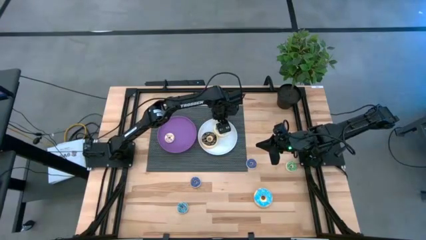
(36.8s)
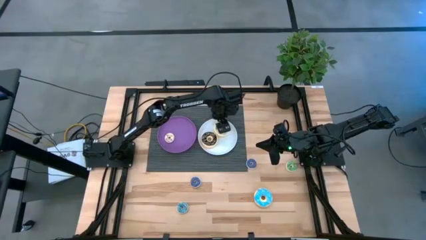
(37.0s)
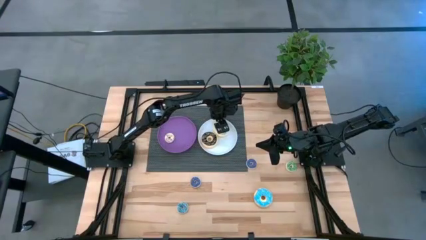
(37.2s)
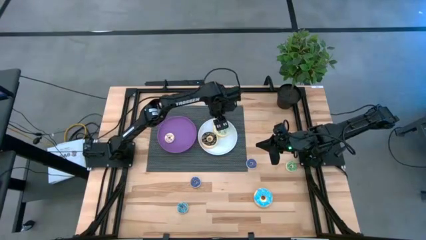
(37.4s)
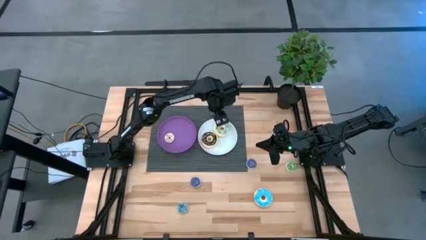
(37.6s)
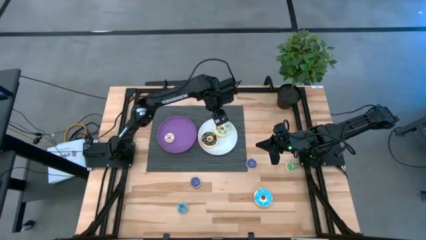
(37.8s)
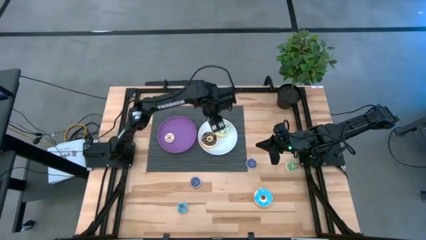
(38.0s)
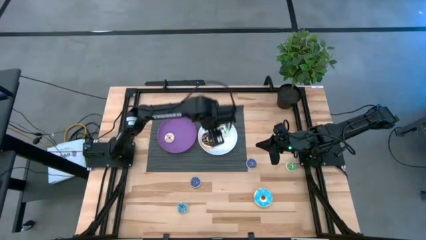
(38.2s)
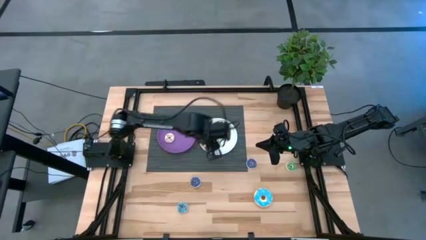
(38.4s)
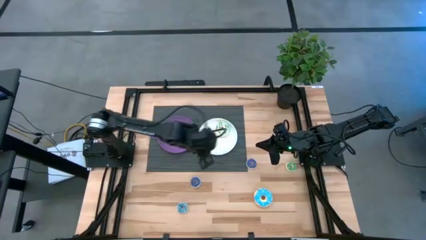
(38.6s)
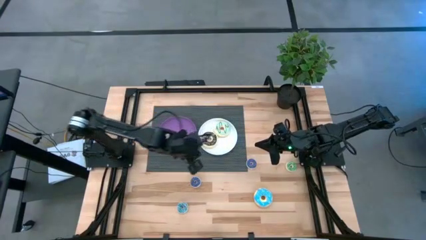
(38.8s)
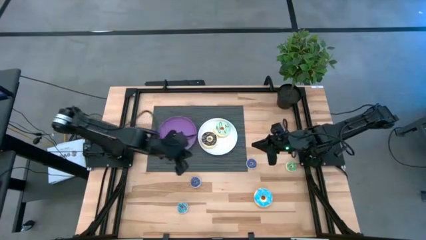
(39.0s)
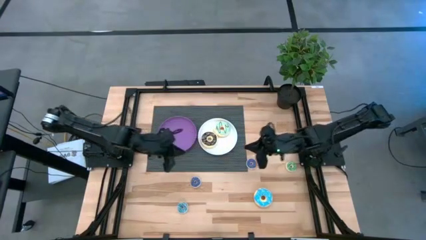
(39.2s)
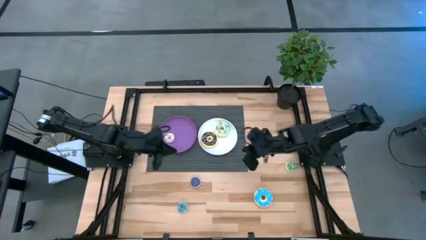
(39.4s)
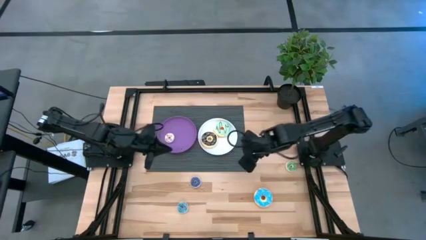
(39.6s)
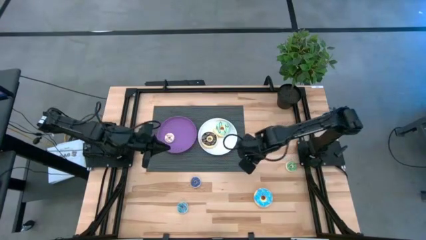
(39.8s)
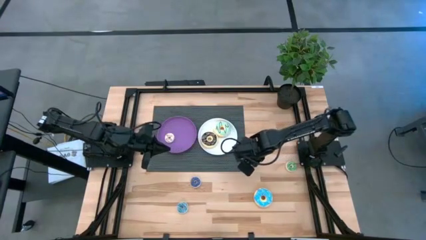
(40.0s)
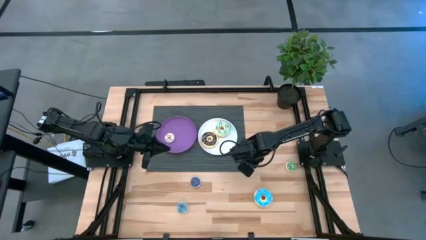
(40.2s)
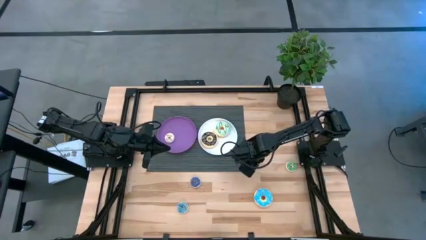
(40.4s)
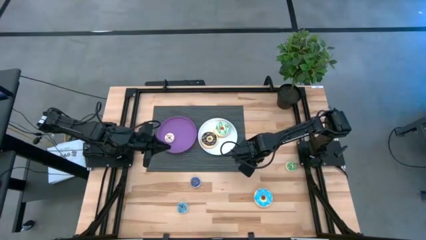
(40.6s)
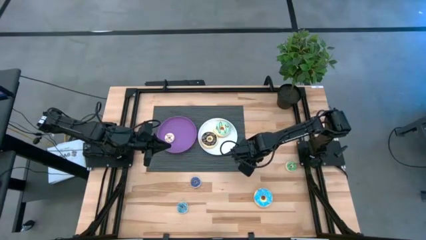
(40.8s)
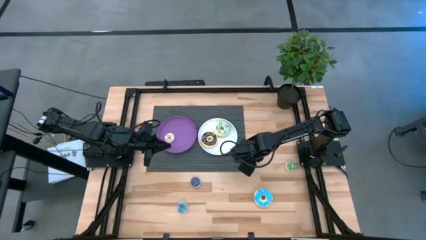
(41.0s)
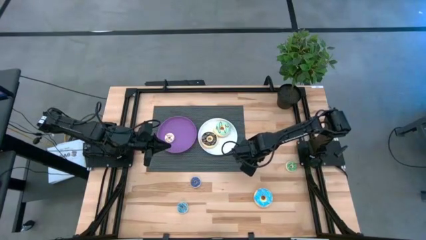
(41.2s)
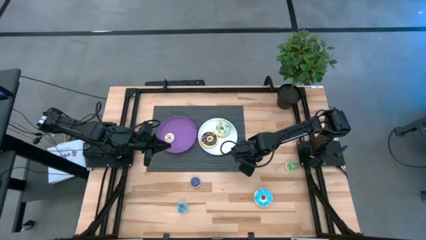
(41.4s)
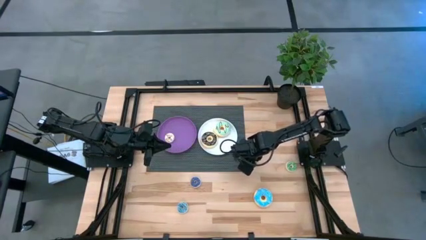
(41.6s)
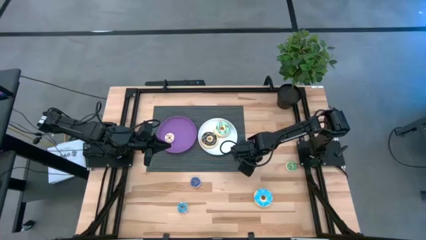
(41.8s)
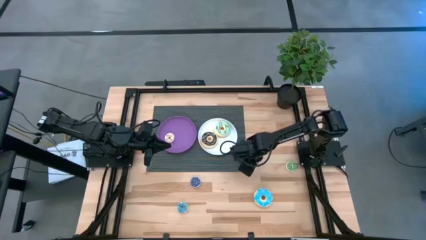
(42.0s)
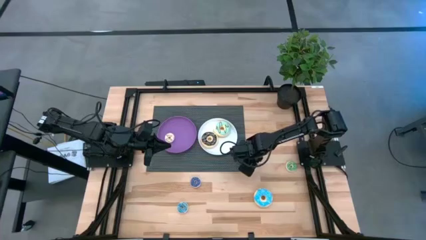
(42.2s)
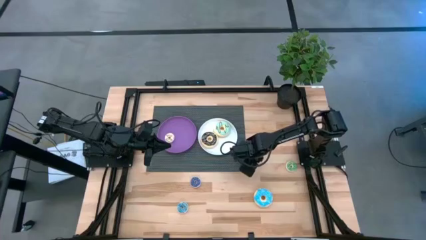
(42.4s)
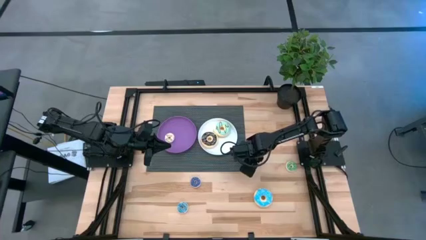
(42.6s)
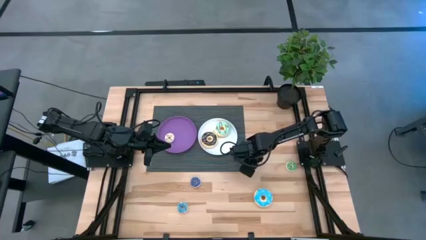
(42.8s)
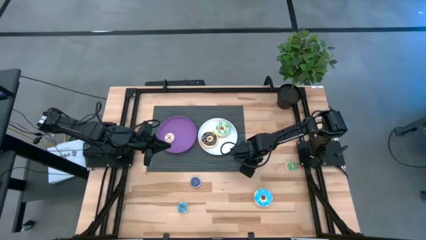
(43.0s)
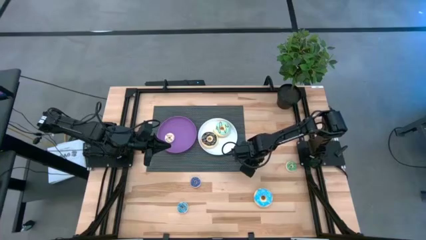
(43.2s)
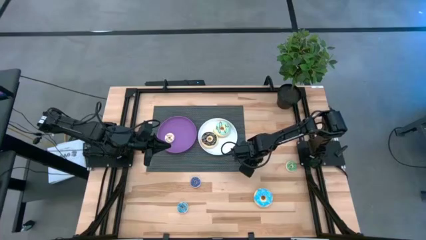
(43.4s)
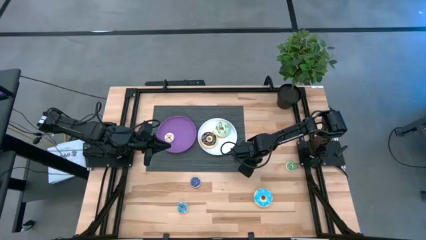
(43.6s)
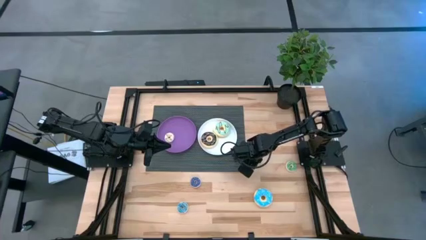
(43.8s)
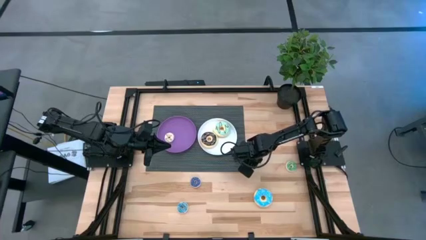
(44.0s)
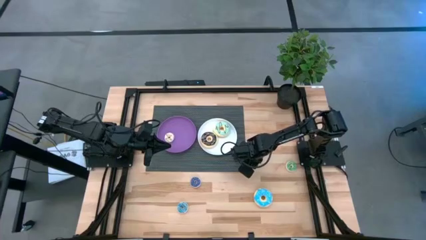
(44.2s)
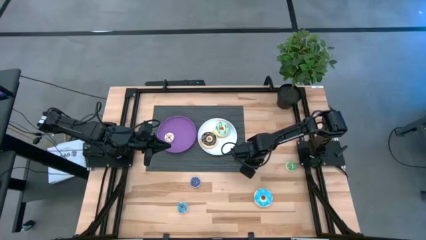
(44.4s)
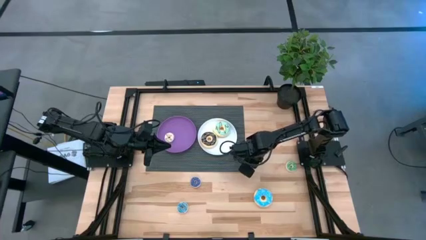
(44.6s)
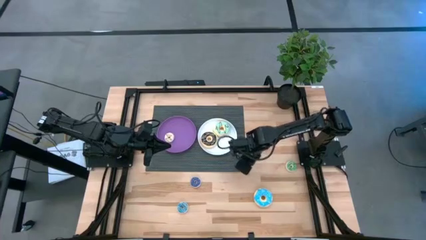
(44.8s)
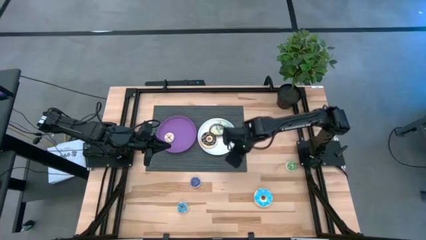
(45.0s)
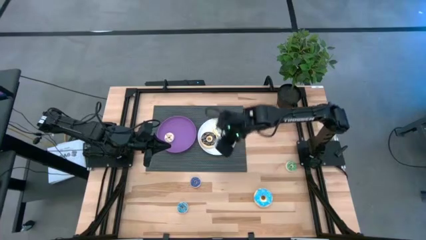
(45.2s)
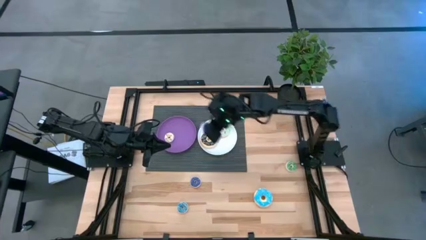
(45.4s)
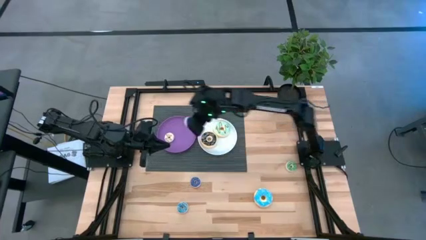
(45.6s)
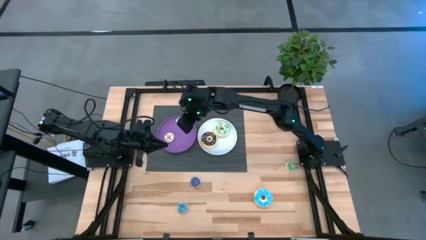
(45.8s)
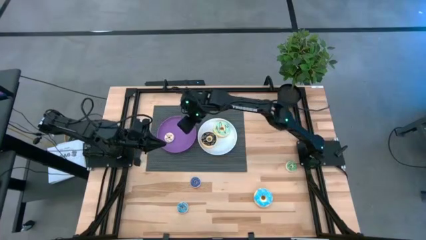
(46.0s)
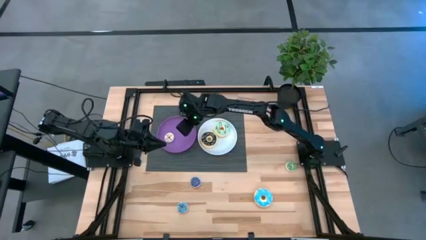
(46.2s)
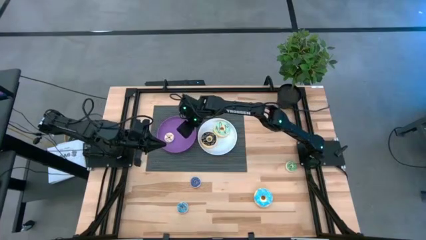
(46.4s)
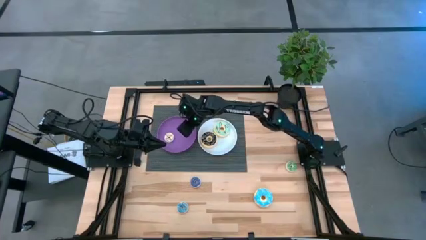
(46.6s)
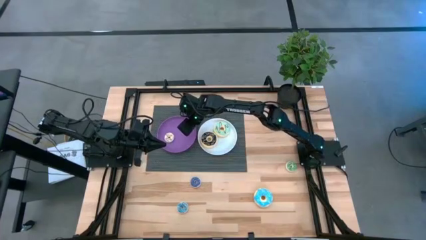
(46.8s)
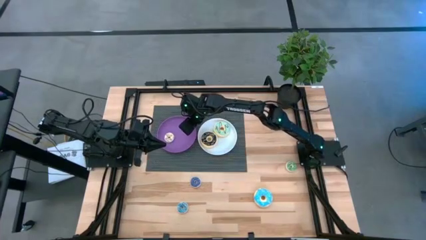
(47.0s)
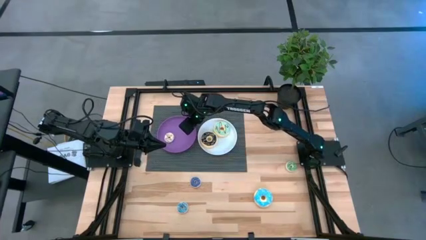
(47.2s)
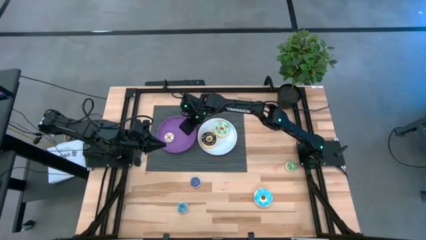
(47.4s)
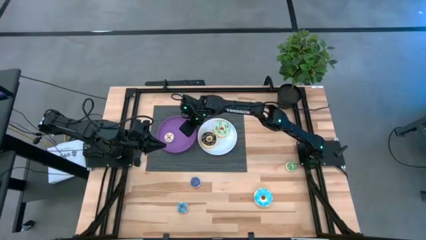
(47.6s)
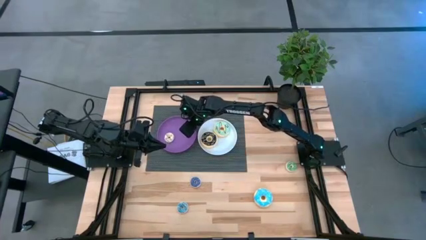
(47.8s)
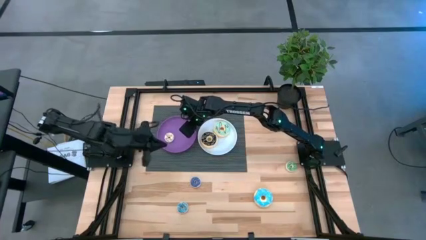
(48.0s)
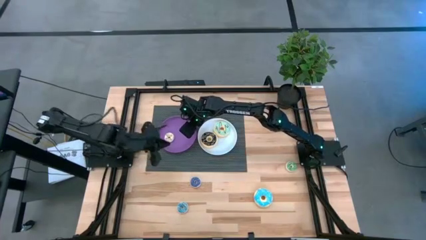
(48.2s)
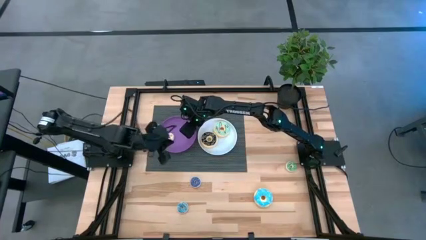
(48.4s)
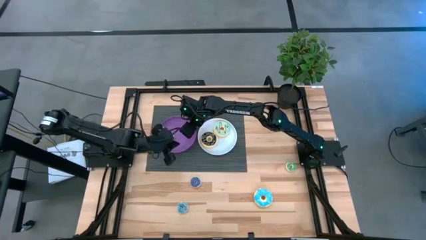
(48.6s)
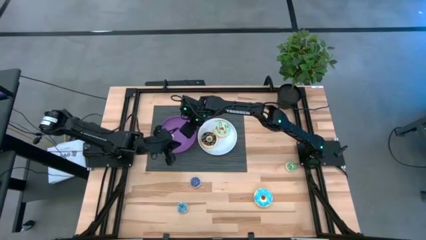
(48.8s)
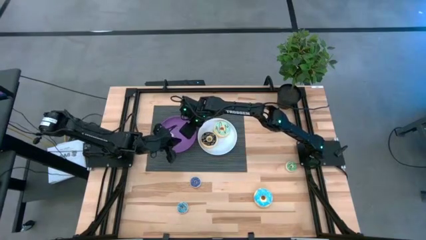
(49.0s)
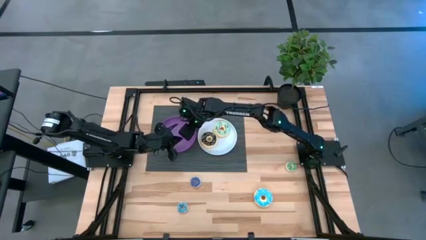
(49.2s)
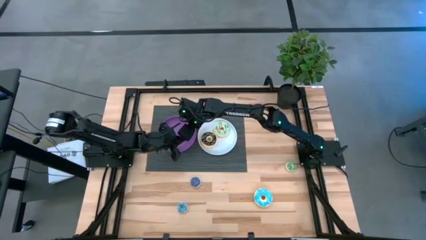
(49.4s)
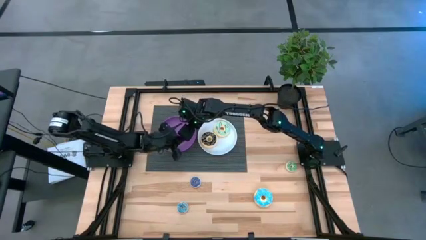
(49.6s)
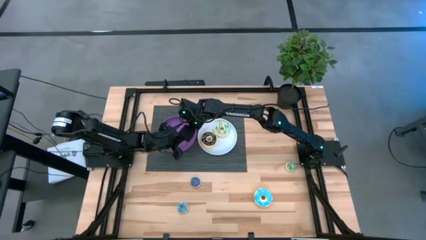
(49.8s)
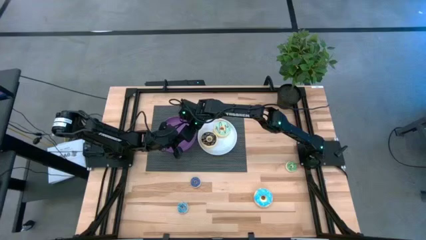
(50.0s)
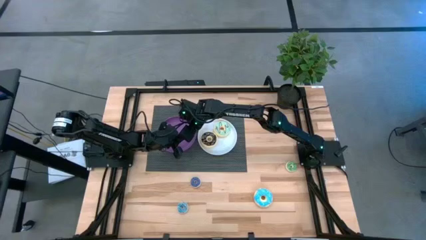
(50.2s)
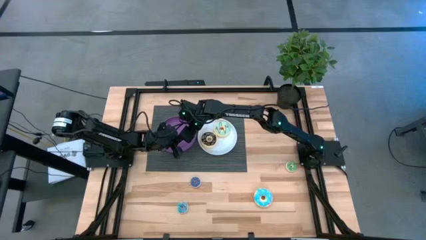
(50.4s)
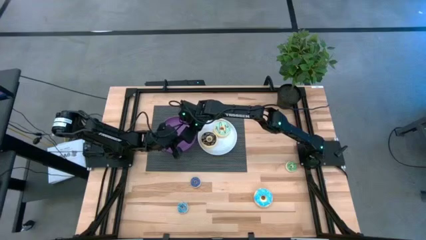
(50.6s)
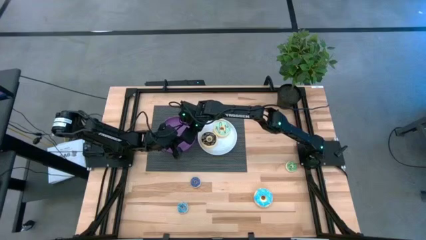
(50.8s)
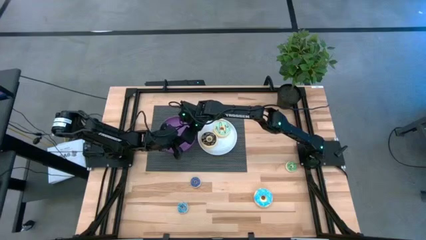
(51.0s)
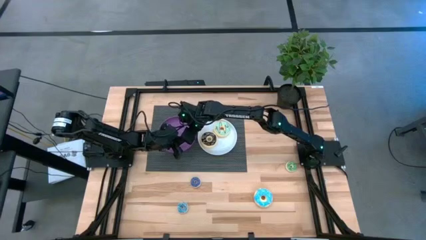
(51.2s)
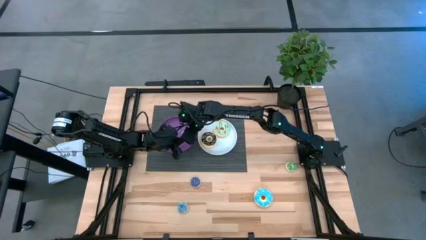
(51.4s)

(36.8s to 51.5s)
Task: Pick & Place donuts
Put the right small dark blue donut on the purple plate
